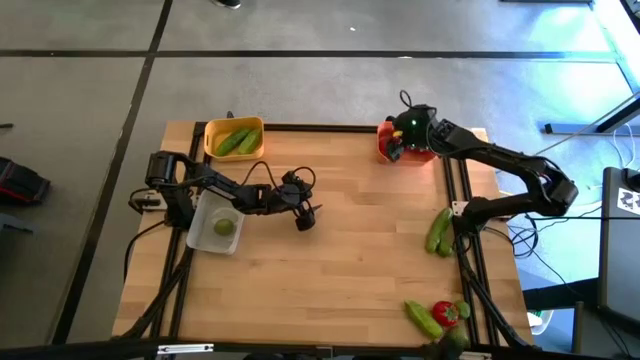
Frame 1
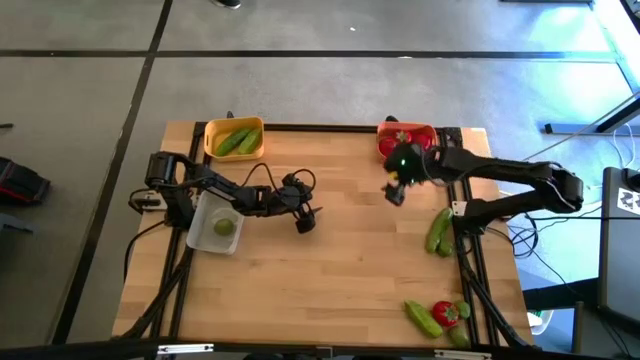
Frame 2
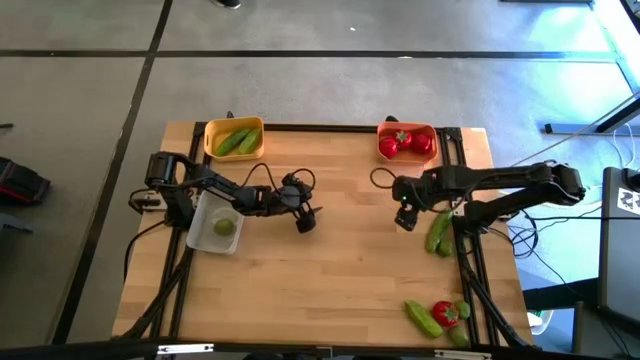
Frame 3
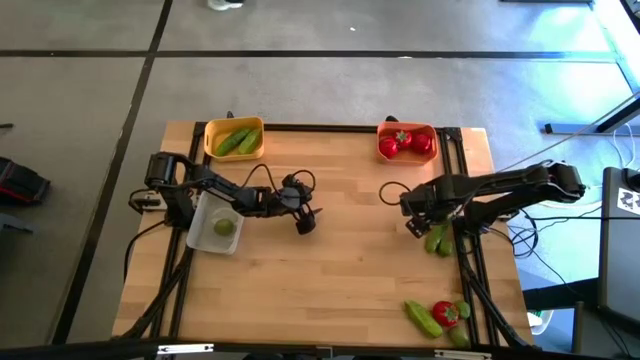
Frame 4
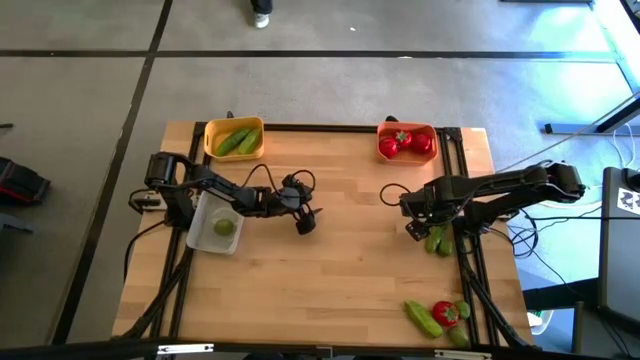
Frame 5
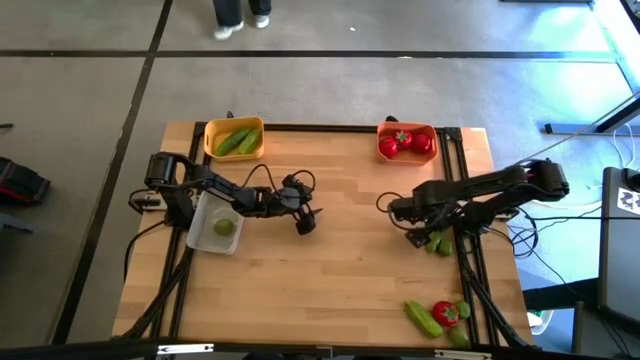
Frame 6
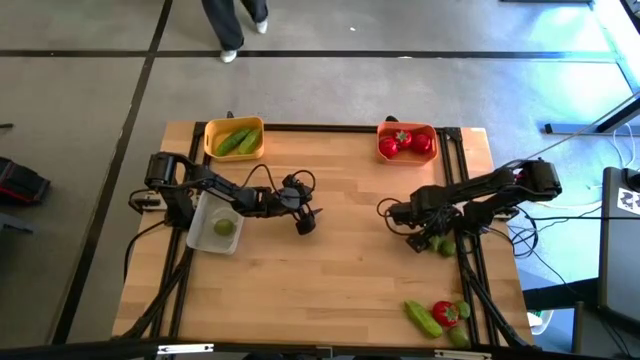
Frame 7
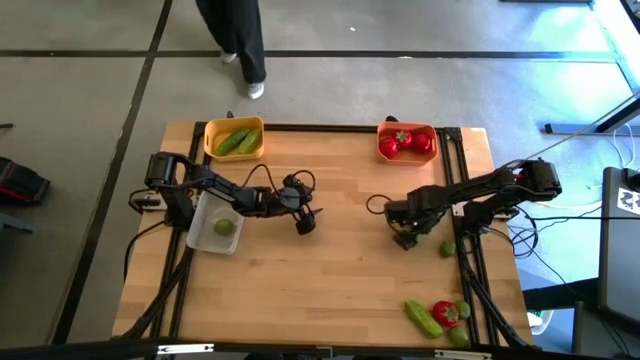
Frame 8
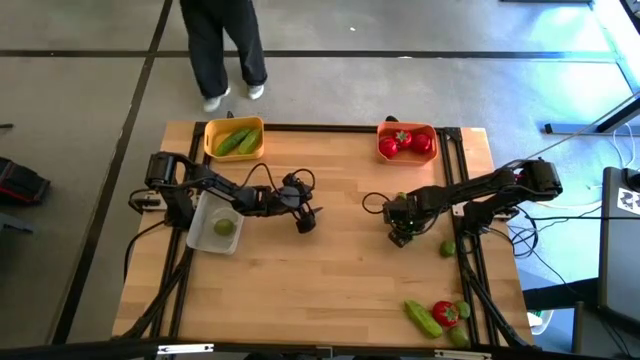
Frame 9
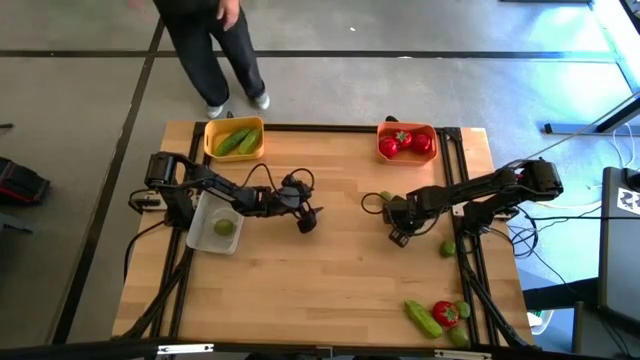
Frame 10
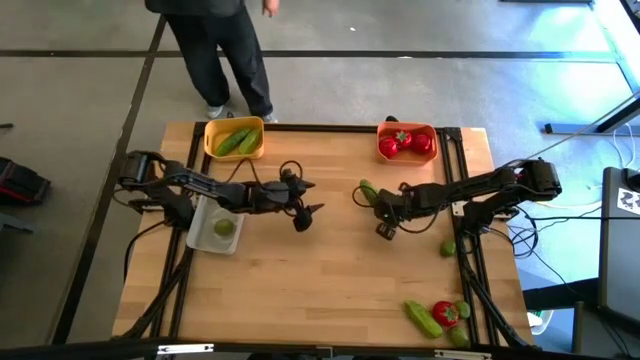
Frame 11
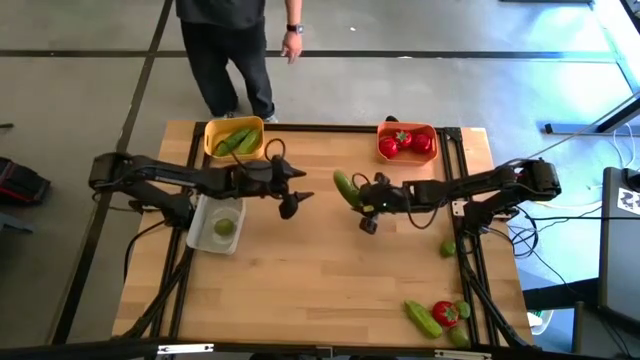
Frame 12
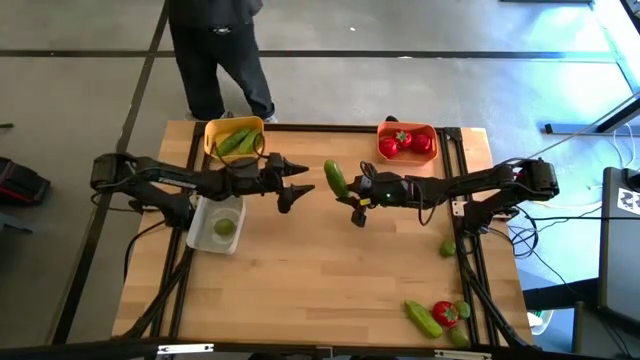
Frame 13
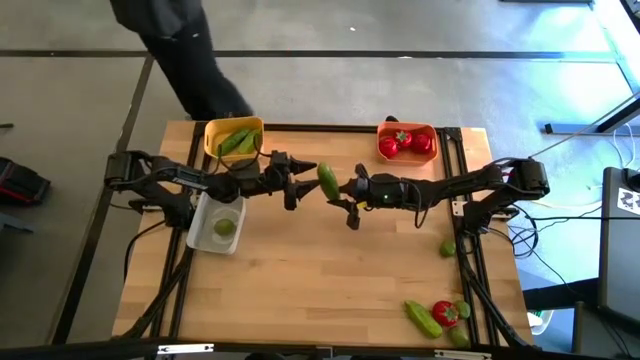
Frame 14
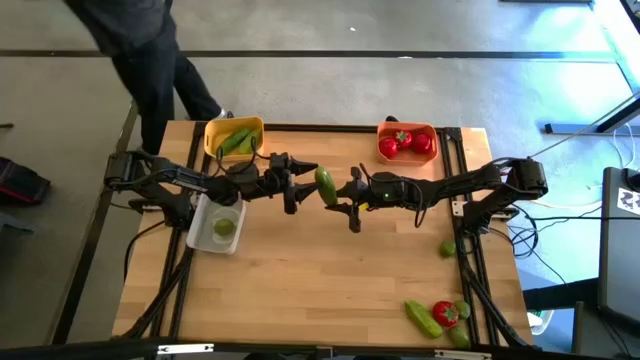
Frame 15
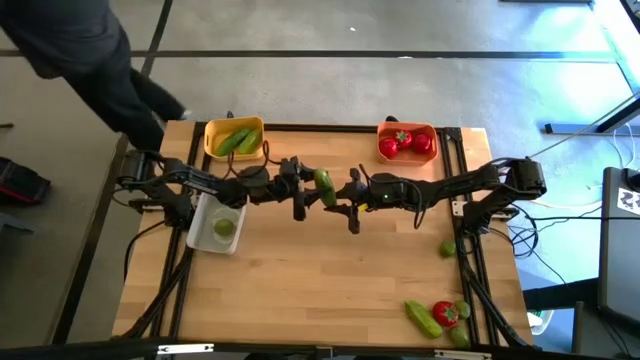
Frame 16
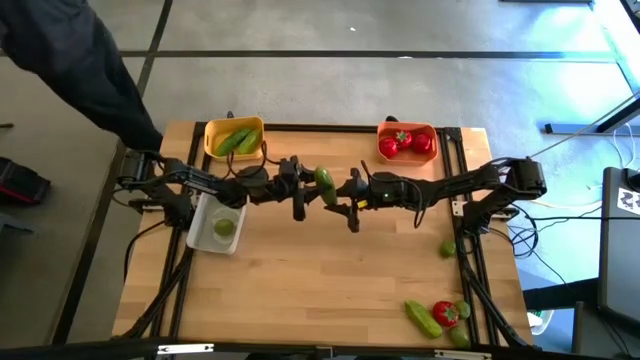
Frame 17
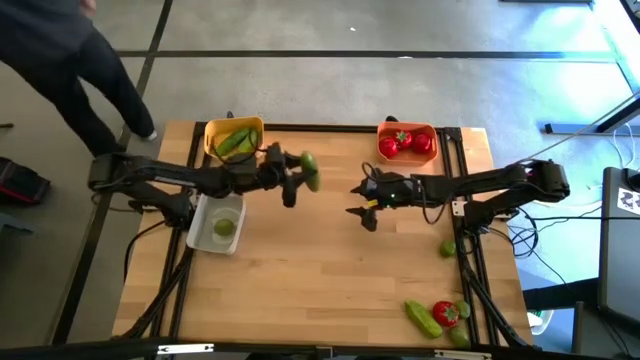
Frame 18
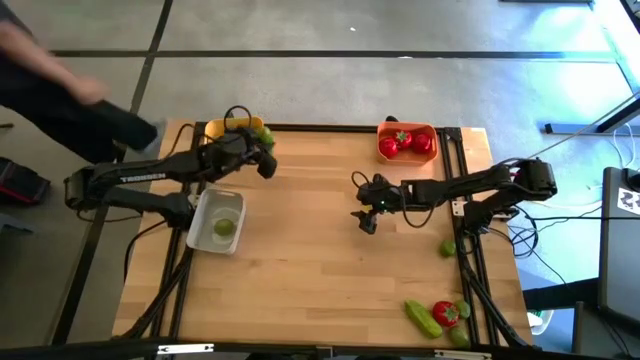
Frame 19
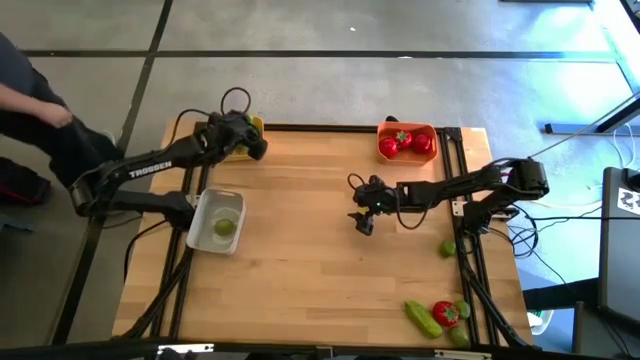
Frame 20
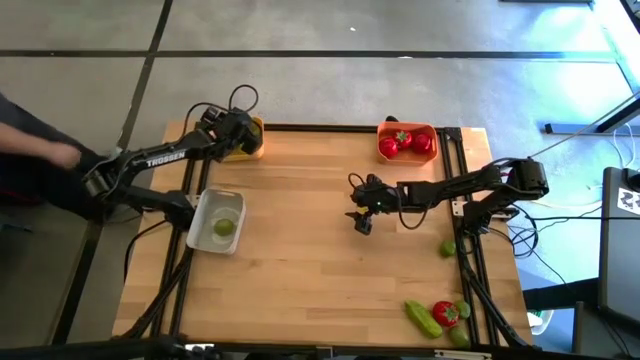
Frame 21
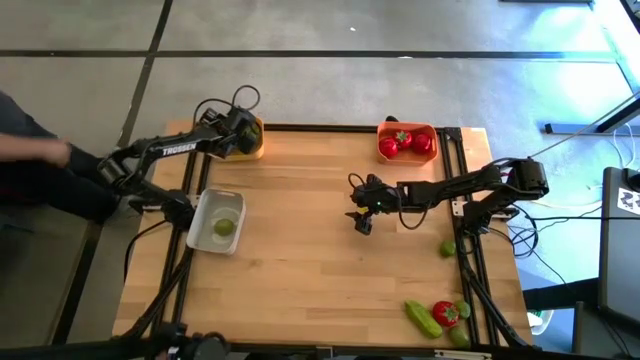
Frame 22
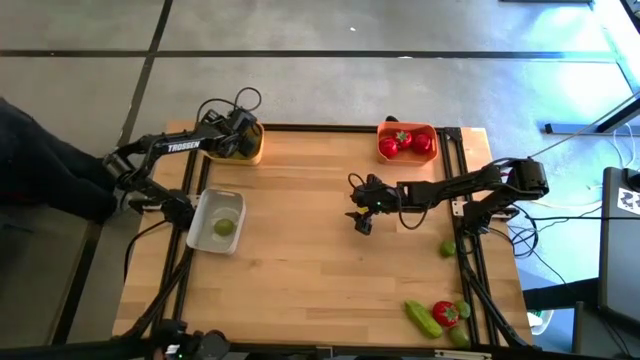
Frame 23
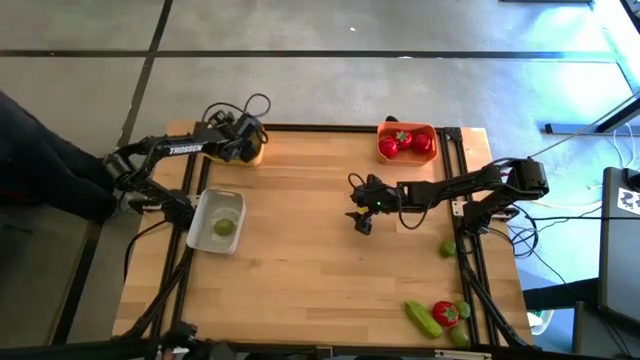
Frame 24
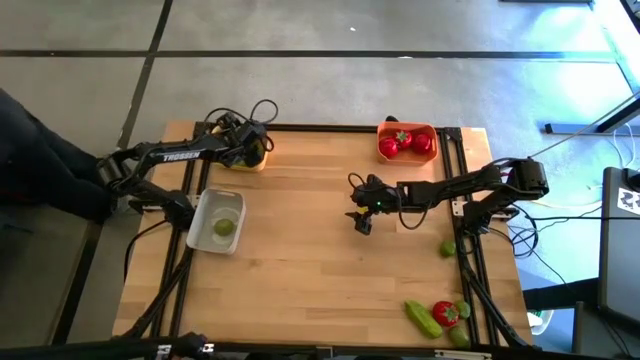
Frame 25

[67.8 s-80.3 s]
Task: Sort produce into baskets
Put the top green cucumber into the yellow bin

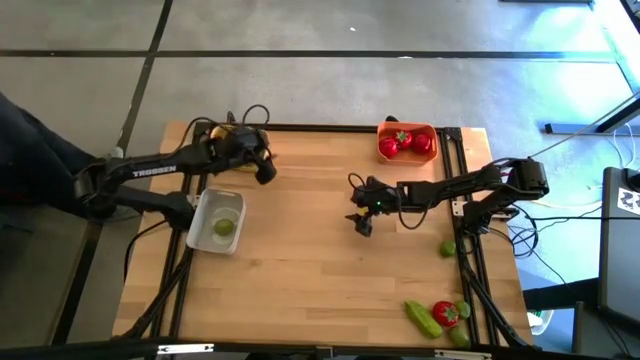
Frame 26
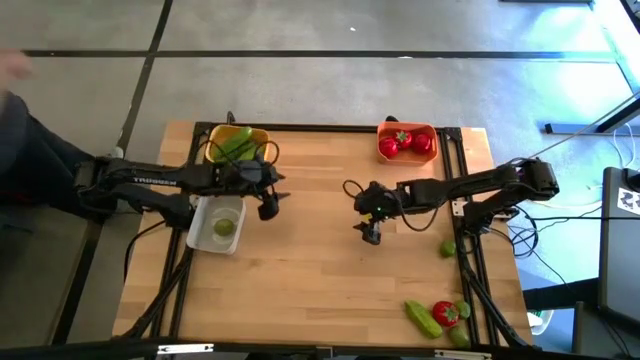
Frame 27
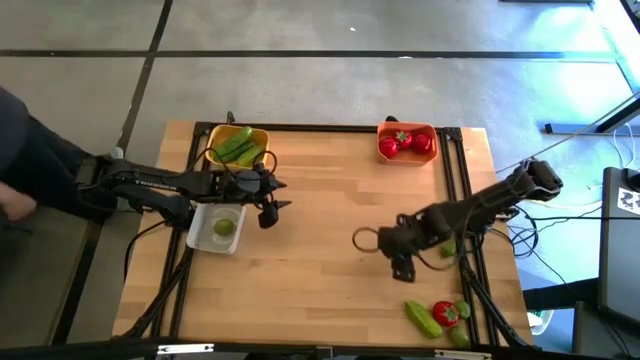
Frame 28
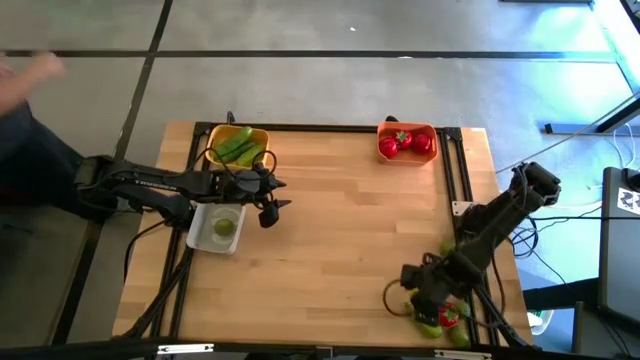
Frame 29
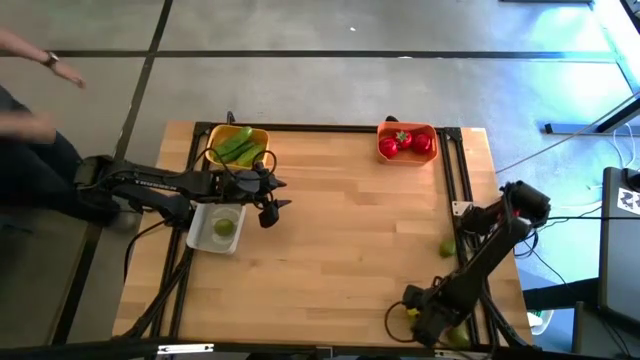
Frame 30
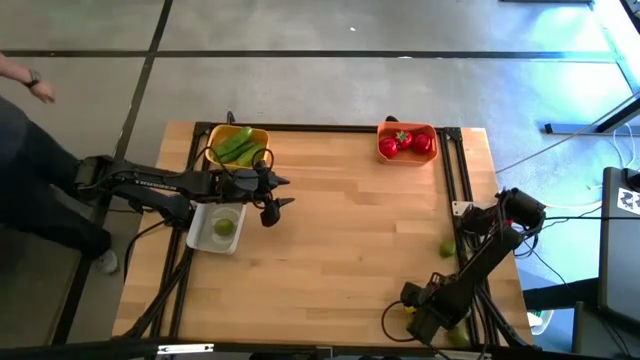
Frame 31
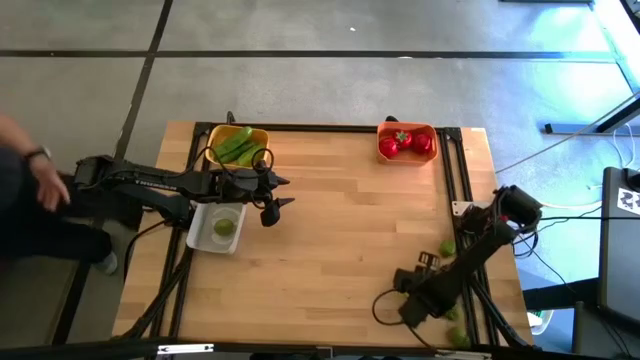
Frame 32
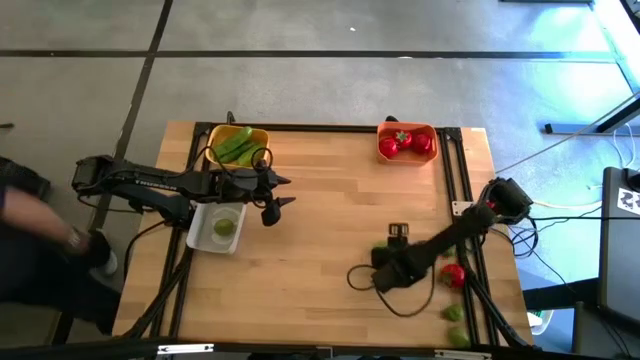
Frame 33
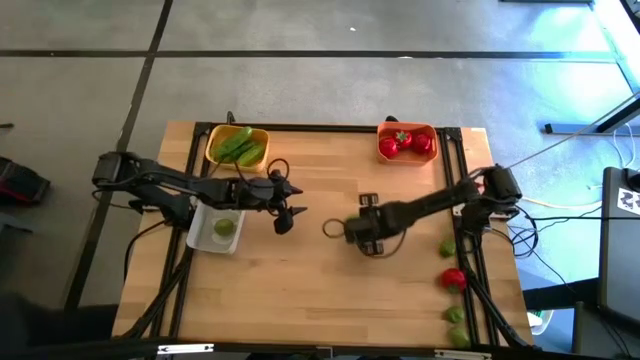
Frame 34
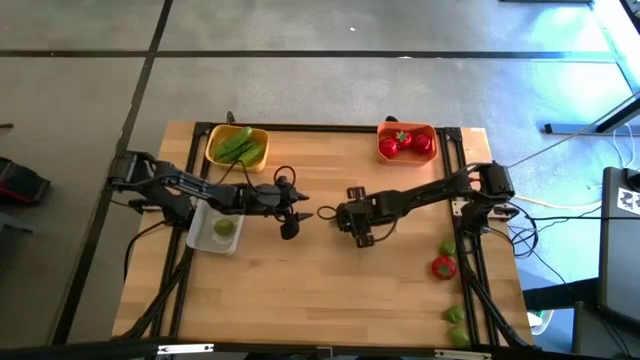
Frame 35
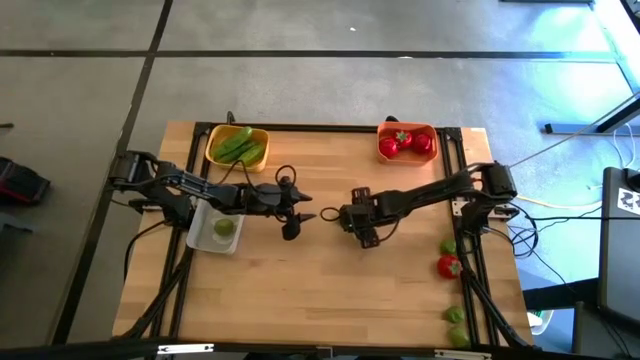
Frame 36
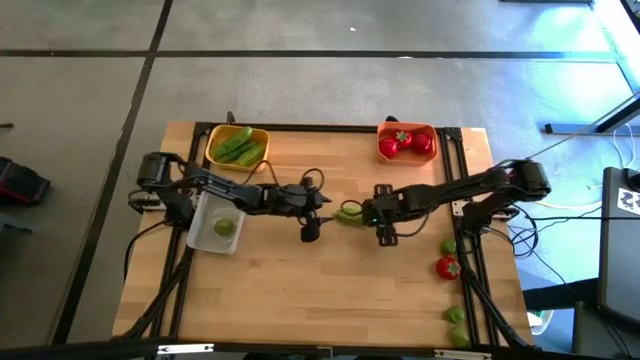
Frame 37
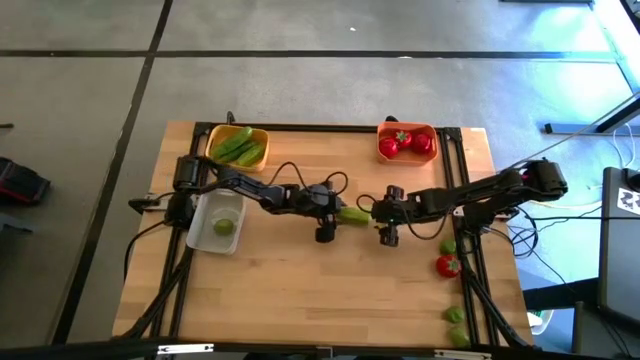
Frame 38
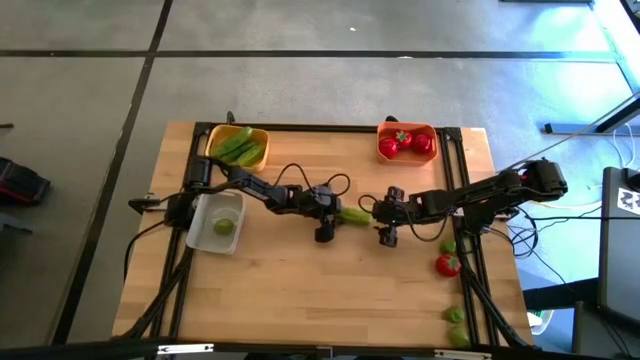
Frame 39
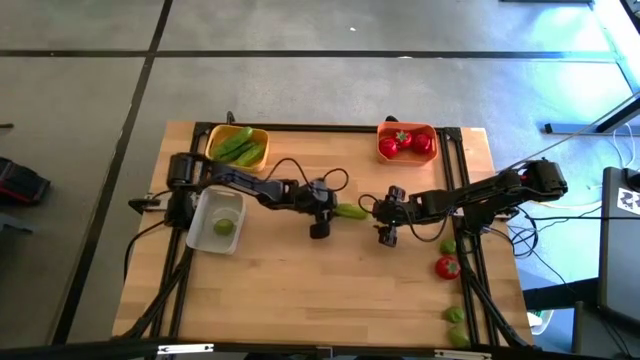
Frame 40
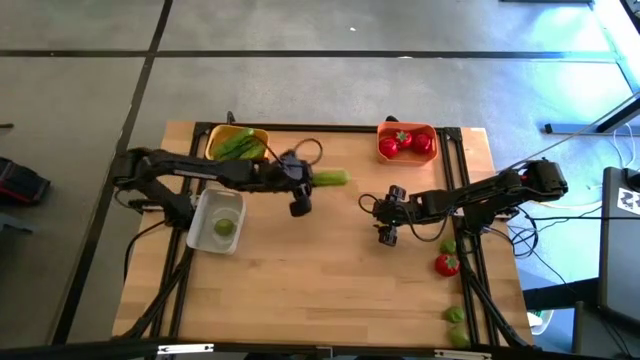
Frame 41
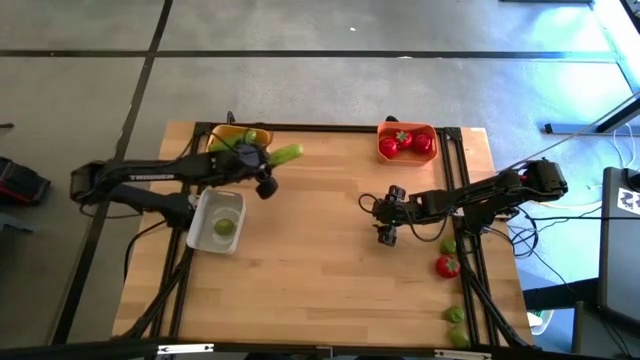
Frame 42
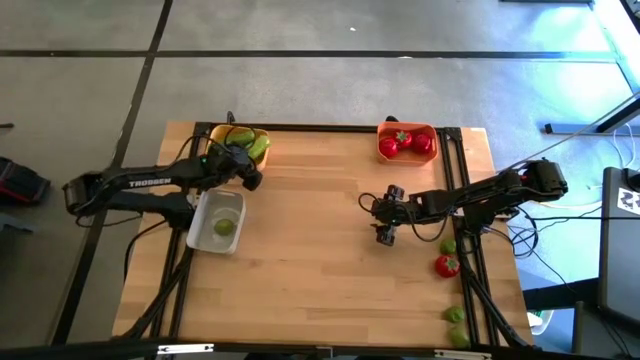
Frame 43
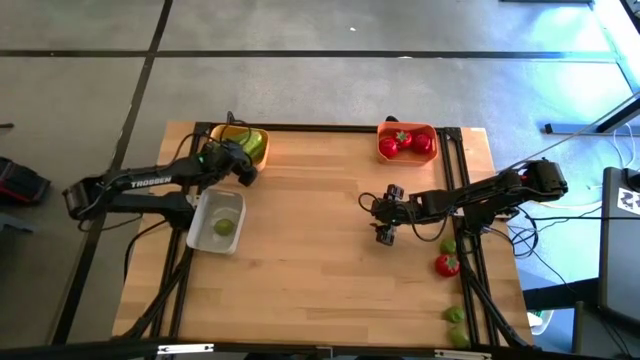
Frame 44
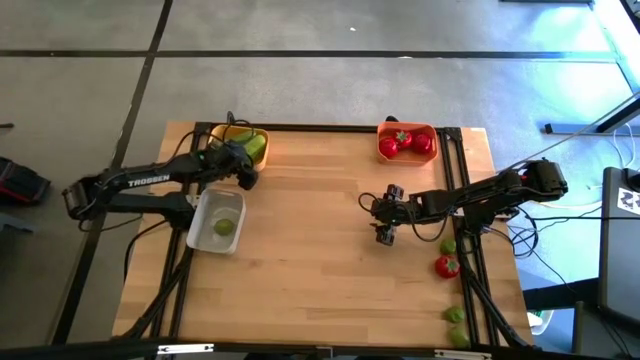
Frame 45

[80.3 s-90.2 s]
Put the green cucumber into the yellow bin
